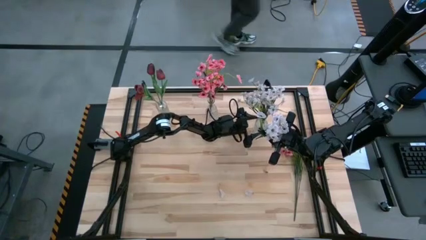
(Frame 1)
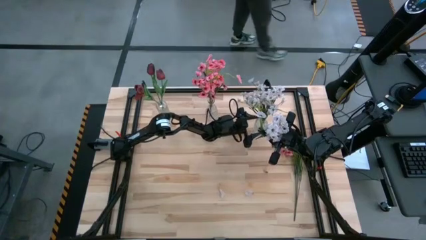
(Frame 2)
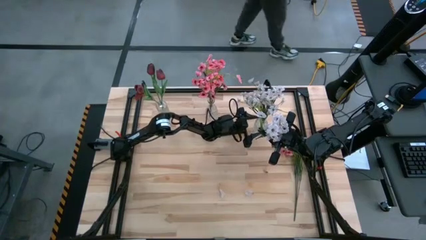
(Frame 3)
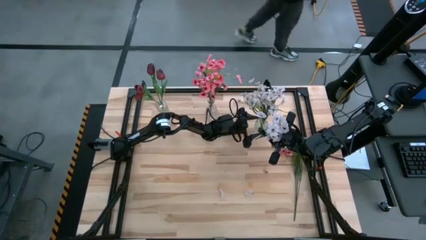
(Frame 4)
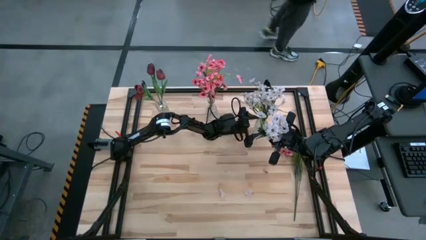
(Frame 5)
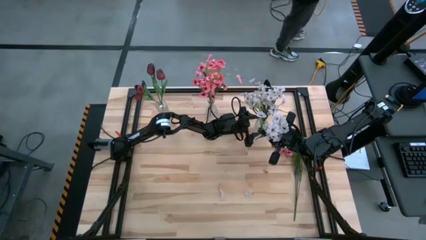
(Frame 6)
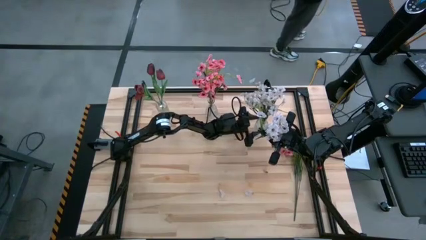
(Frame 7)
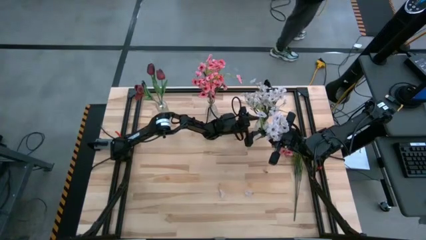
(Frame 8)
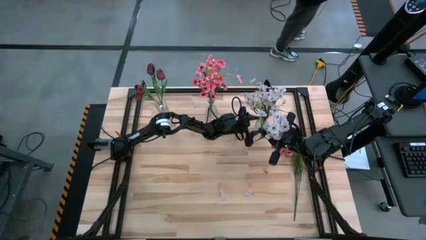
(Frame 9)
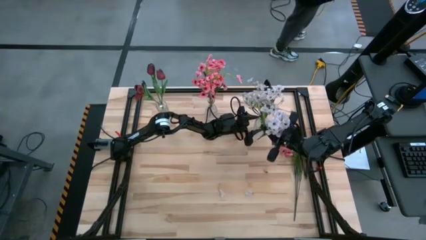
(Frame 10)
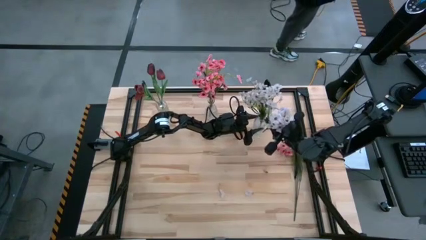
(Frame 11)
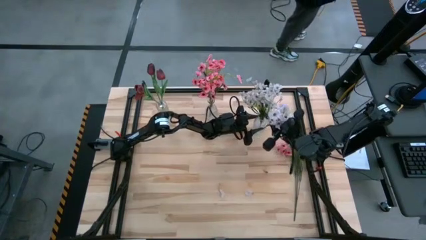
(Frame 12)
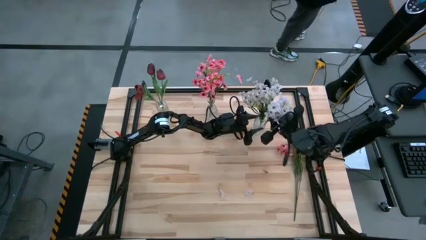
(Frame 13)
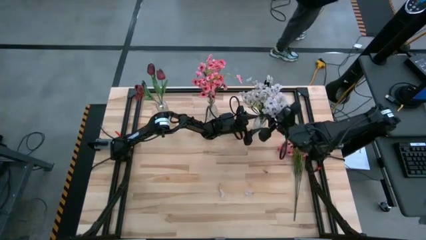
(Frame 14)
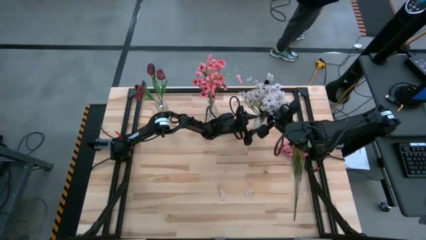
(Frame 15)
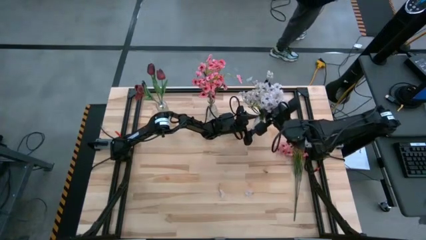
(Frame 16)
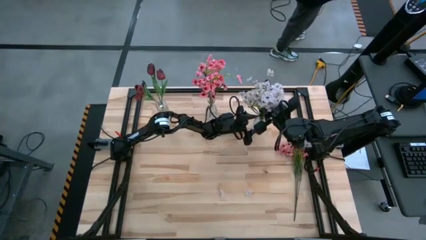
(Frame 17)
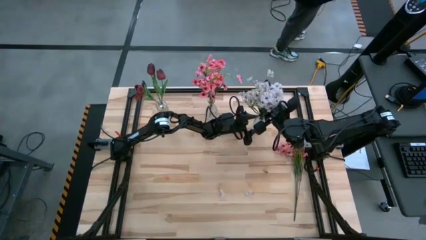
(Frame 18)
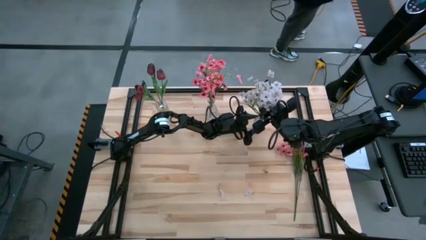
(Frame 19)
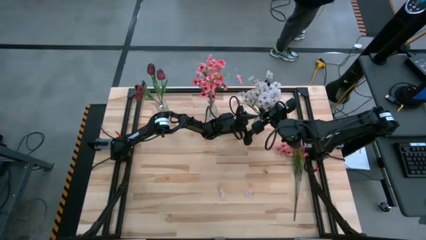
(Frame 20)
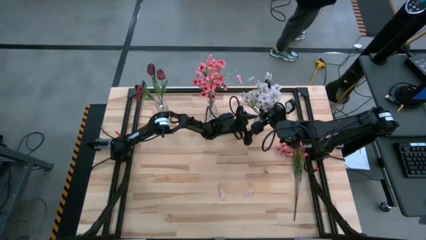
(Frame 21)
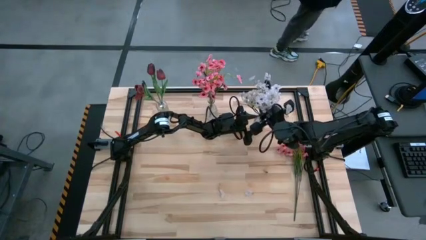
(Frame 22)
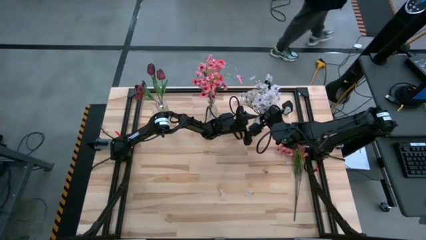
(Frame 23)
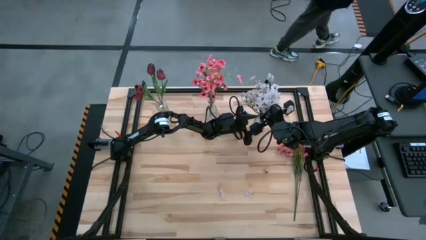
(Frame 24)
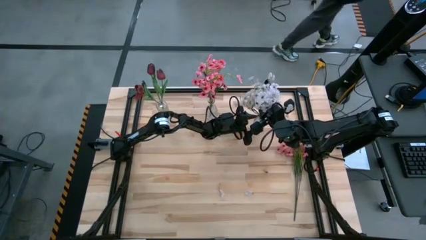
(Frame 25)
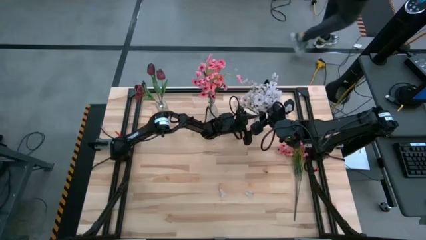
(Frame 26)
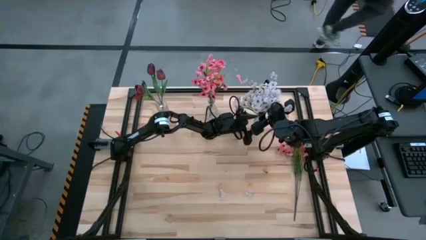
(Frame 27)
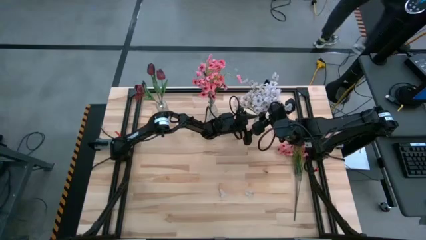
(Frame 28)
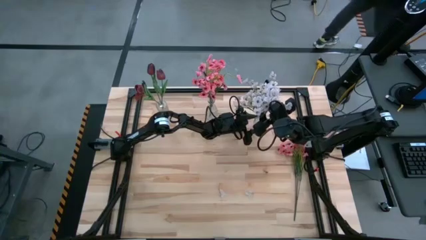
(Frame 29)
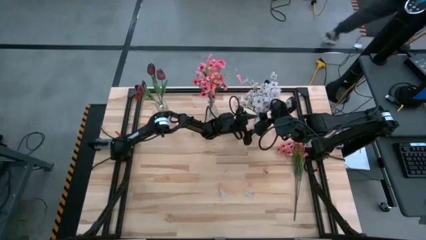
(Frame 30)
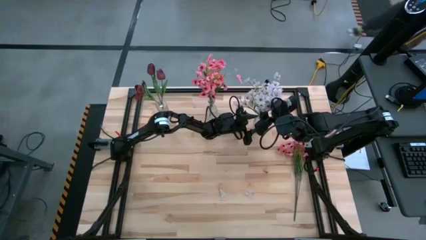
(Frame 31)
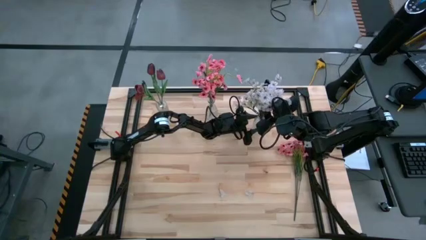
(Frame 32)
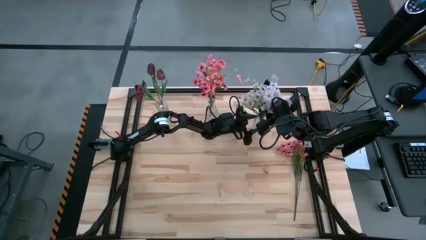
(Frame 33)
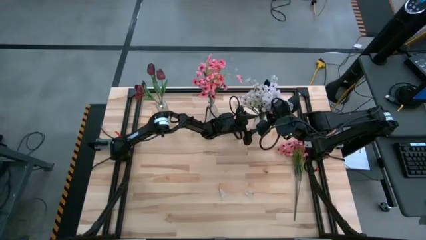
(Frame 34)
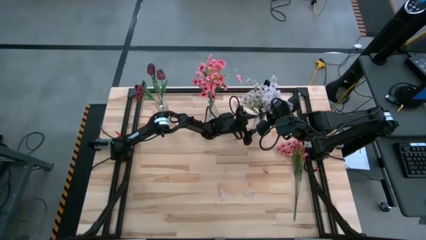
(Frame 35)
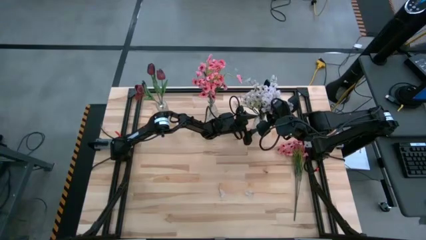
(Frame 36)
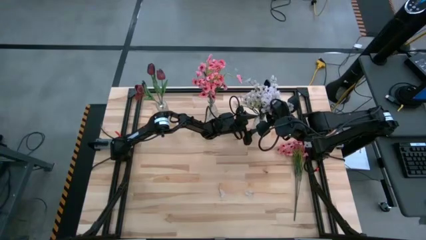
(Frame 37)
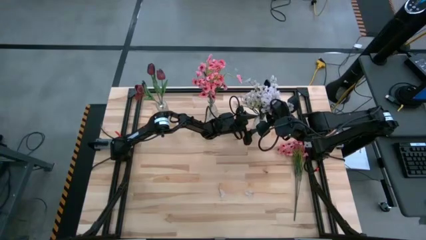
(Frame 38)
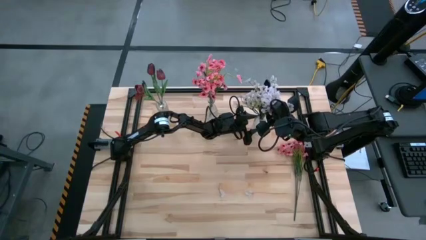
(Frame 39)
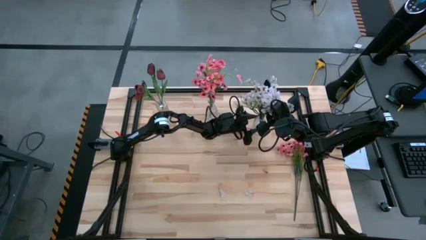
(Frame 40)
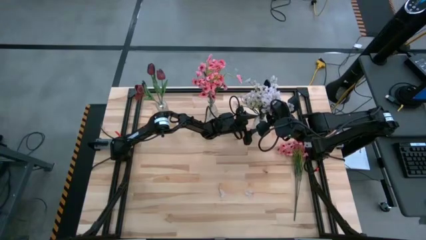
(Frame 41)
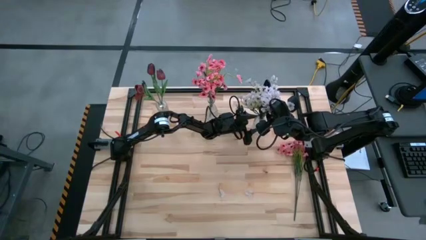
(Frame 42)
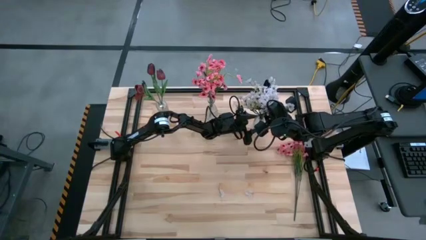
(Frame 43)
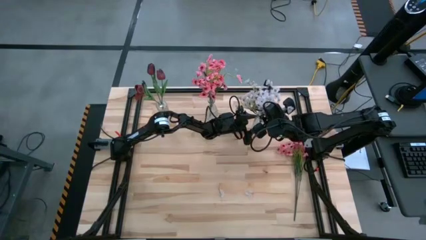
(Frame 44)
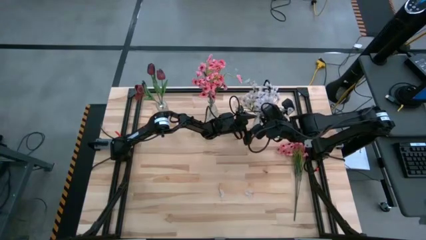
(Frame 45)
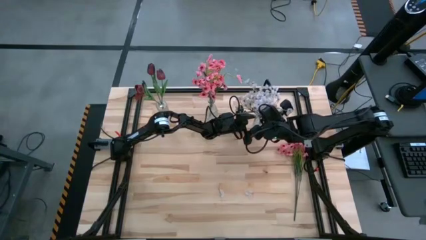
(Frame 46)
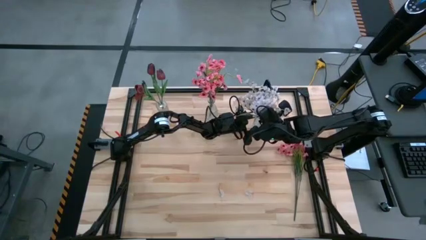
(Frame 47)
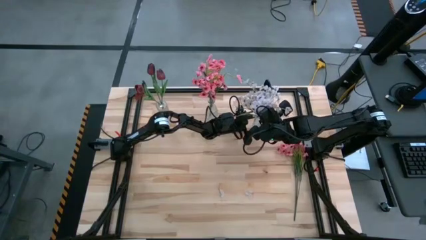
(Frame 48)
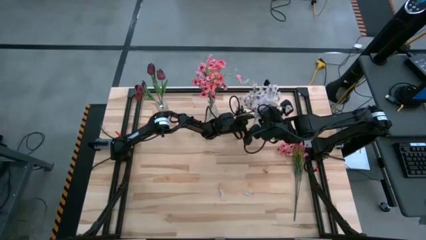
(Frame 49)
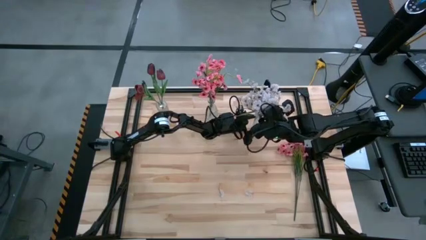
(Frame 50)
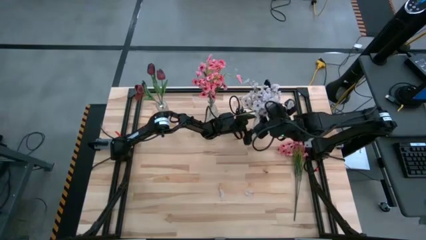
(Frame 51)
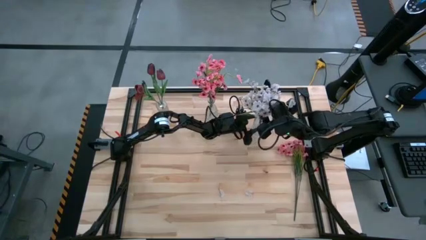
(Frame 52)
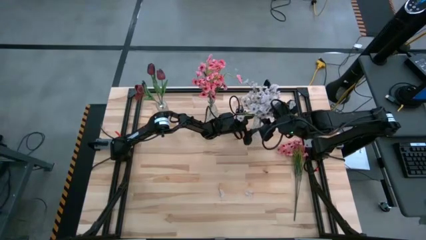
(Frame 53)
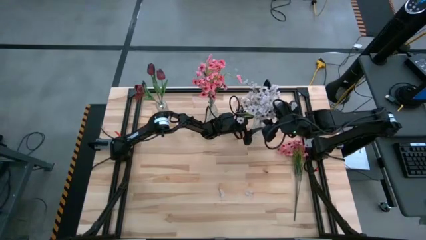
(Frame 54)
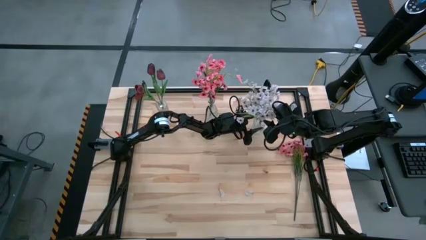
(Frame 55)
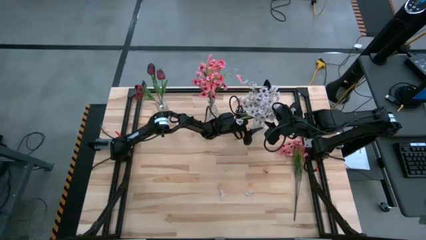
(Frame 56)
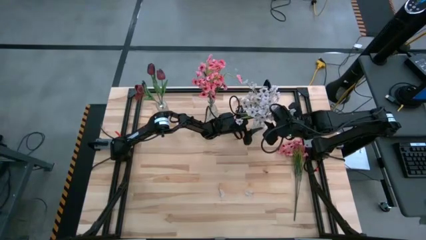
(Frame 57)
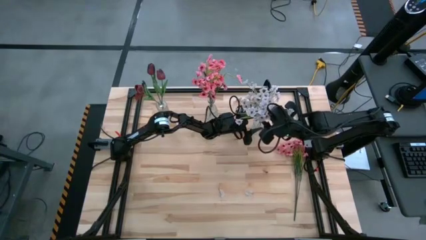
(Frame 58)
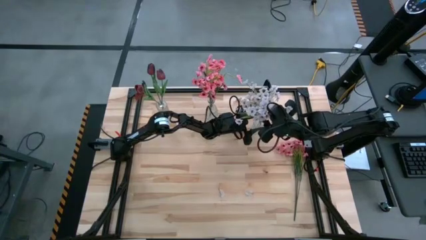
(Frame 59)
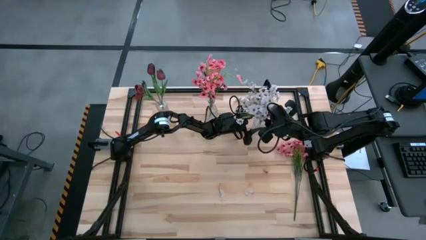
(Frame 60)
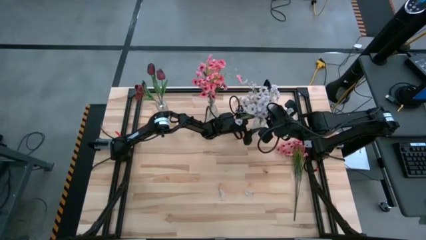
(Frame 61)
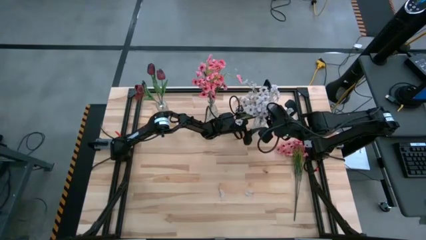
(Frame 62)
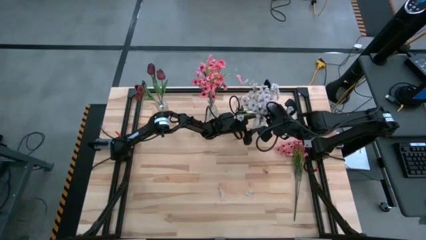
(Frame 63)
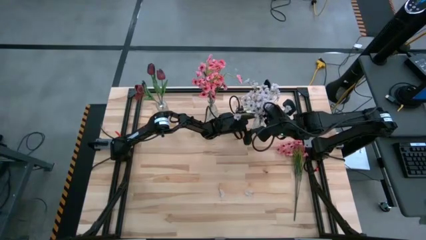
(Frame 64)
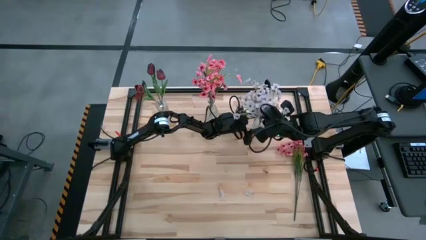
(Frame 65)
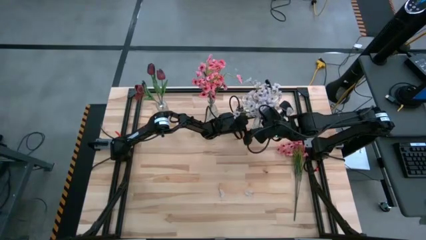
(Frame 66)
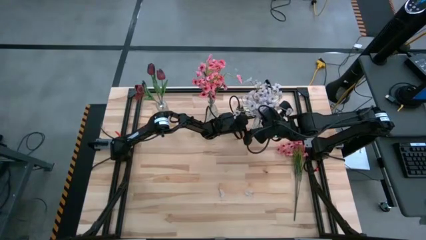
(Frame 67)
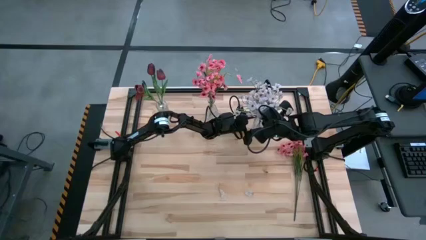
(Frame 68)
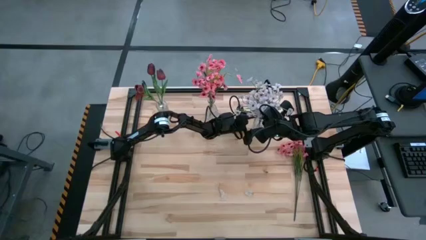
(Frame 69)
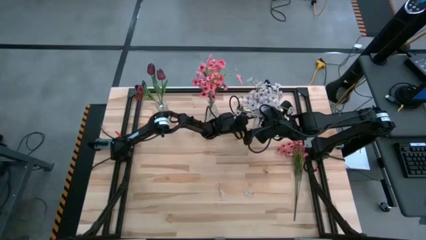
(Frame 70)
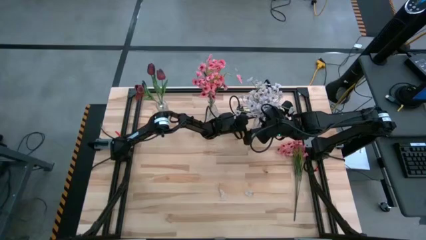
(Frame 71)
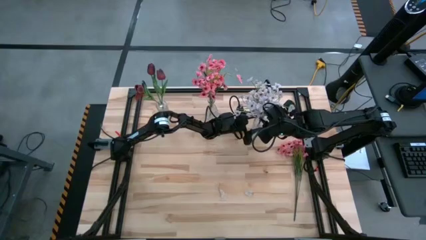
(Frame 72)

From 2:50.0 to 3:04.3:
Task: Sort flowers into vase by color
Put the white flowers into the right transparent vase
